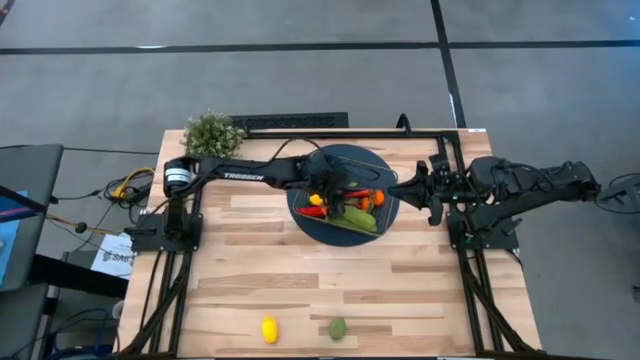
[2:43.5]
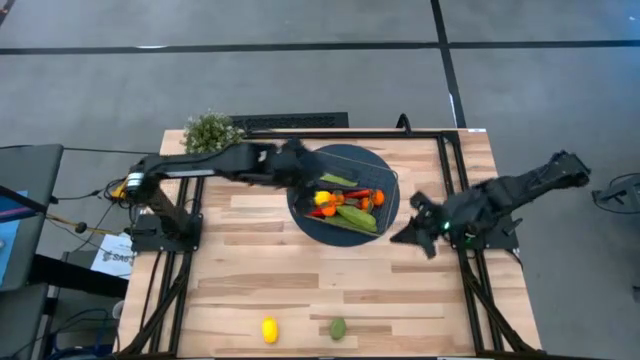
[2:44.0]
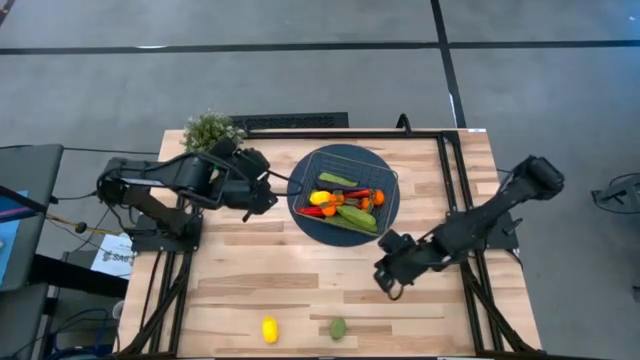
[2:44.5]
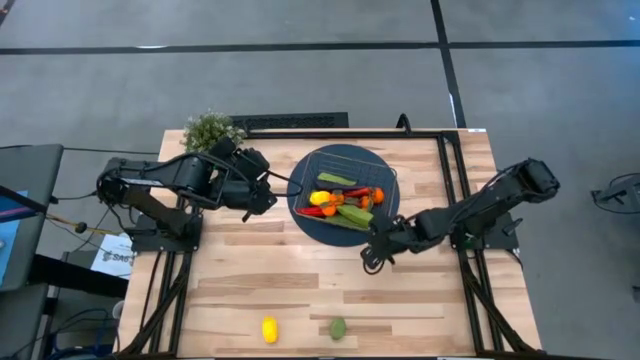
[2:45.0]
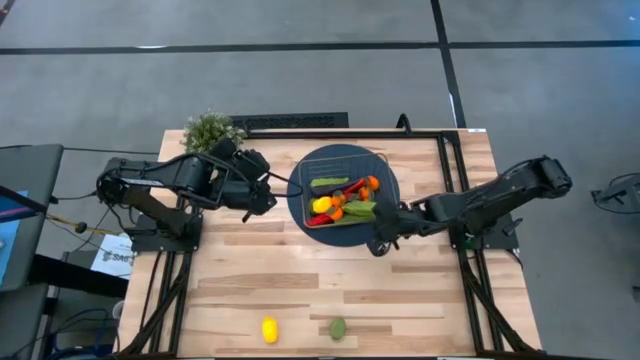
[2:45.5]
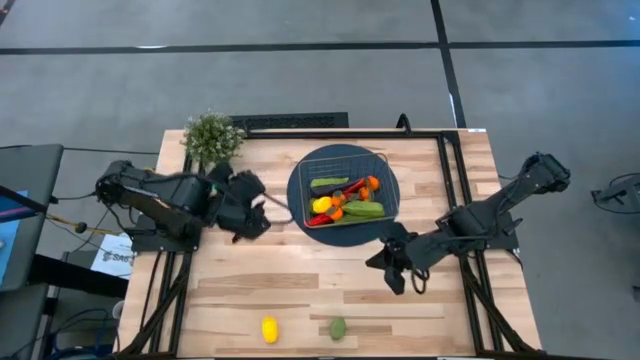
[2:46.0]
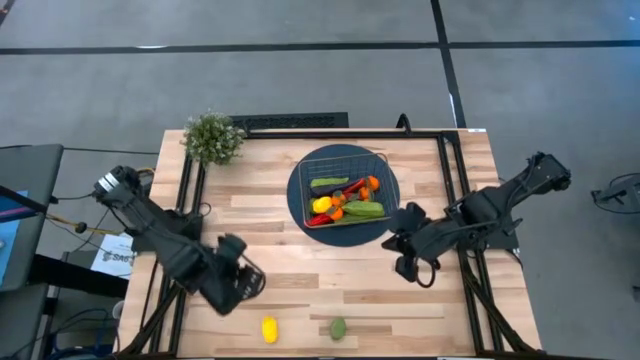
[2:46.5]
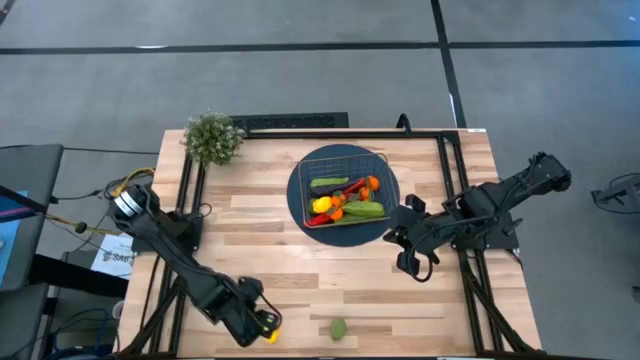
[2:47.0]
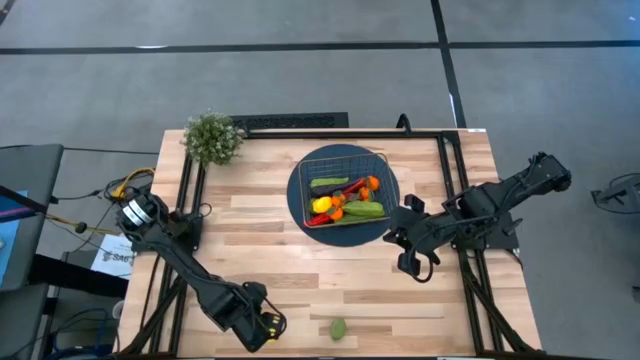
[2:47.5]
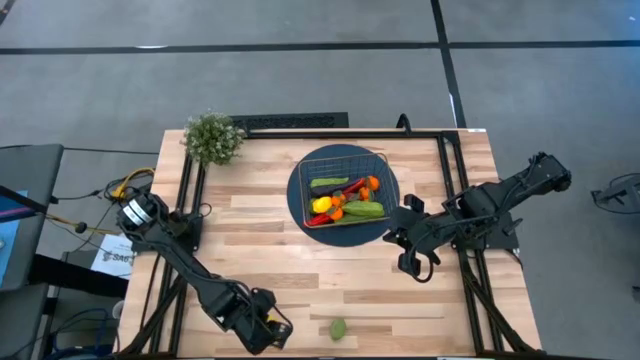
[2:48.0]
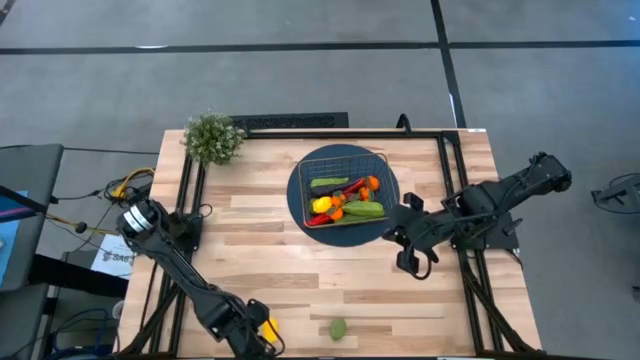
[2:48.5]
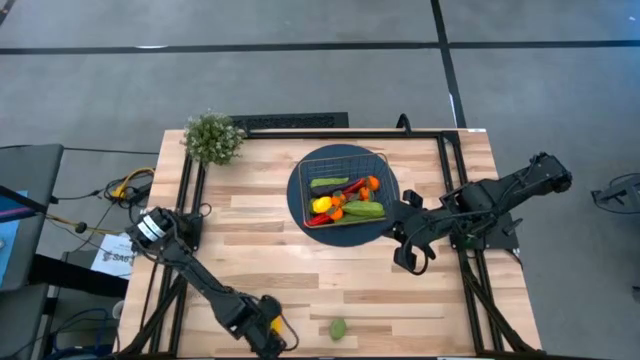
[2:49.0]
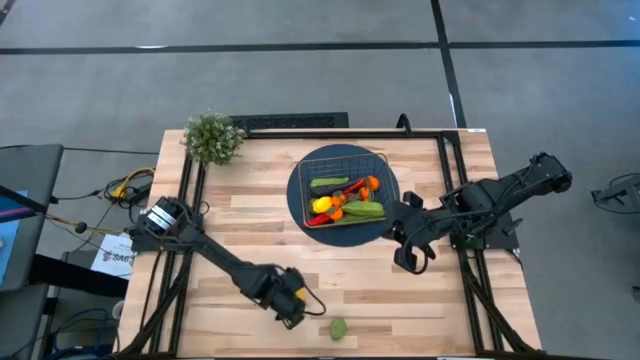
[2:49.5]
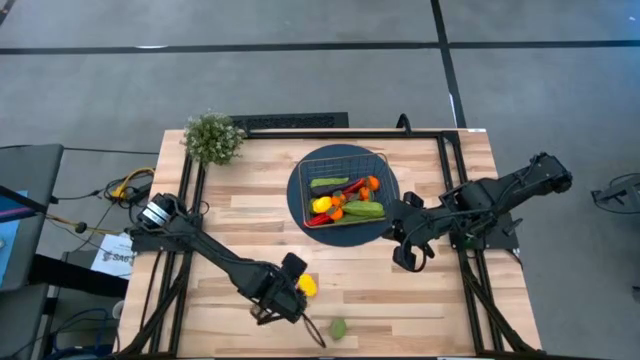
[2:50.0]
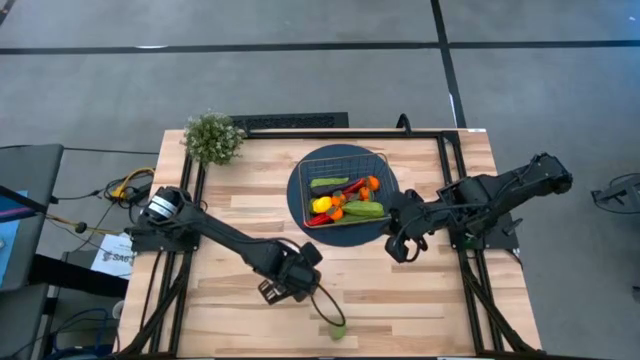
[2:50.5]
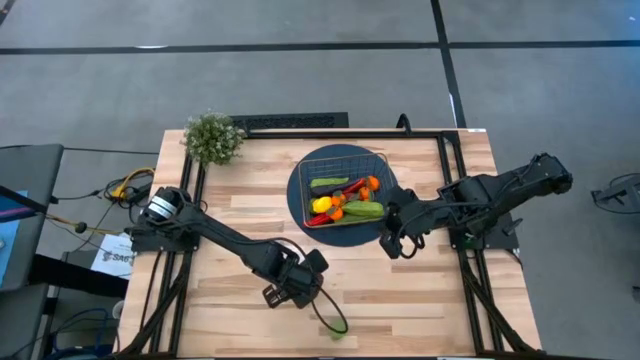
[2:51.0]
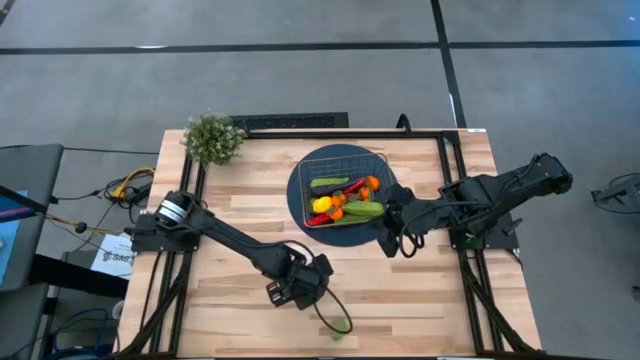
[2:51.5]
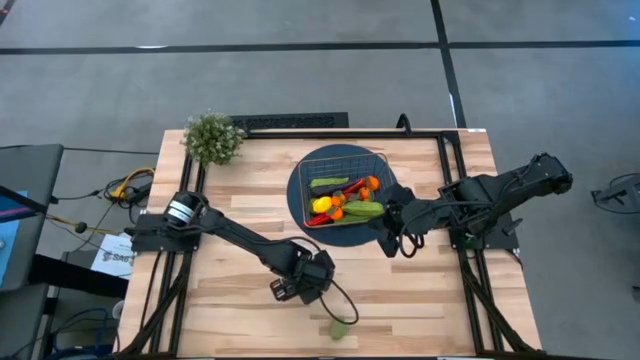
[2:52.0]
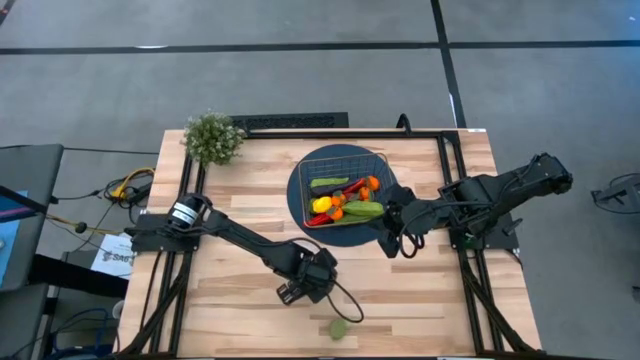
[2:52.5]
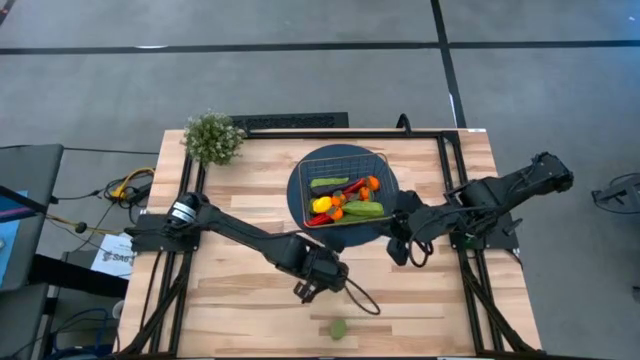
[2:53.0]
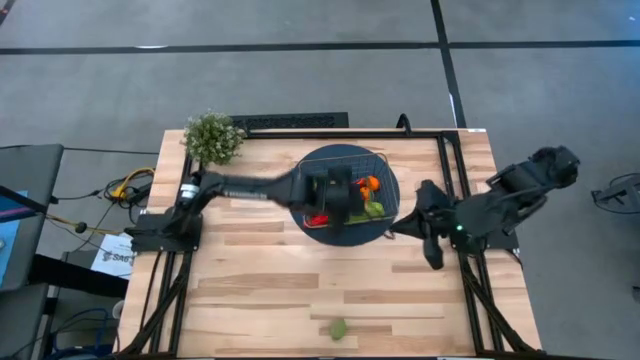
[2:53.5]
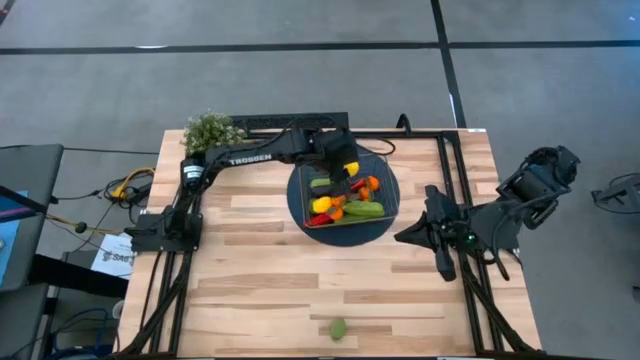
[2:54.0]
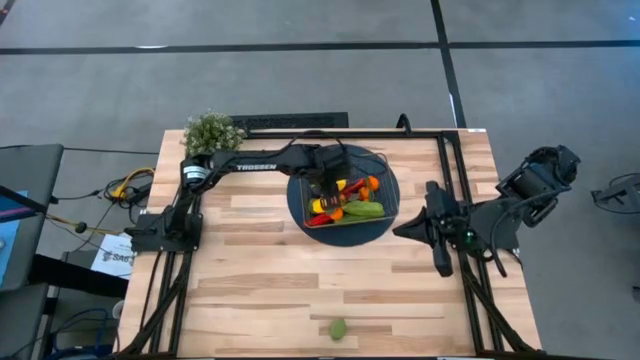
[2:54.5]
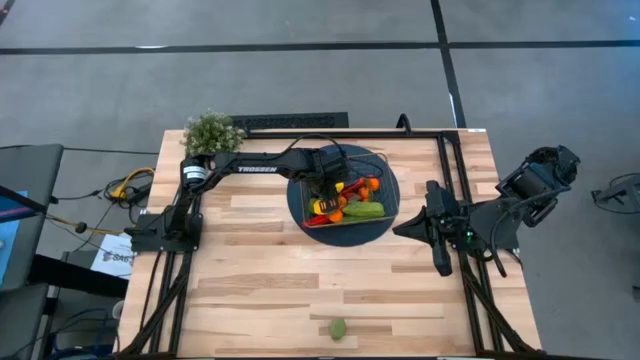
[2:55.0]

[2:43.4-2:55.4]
Task: Build produce basket
Put the lemon into the wire basket

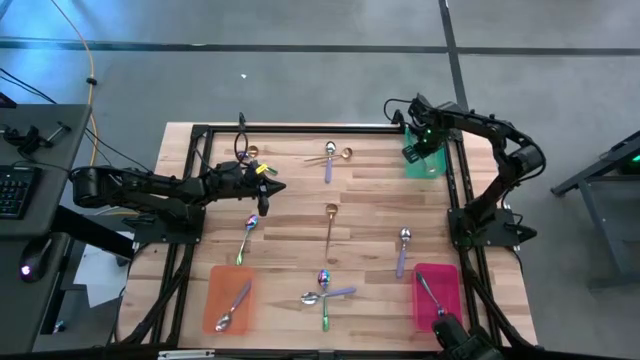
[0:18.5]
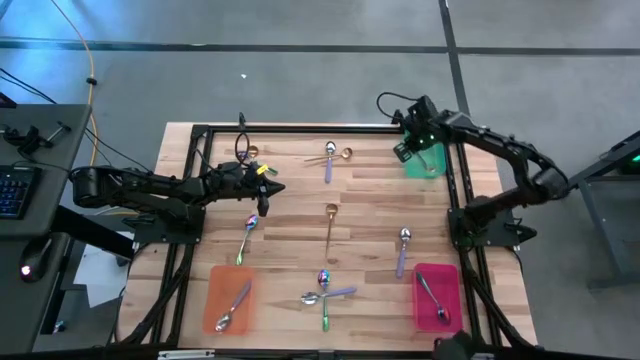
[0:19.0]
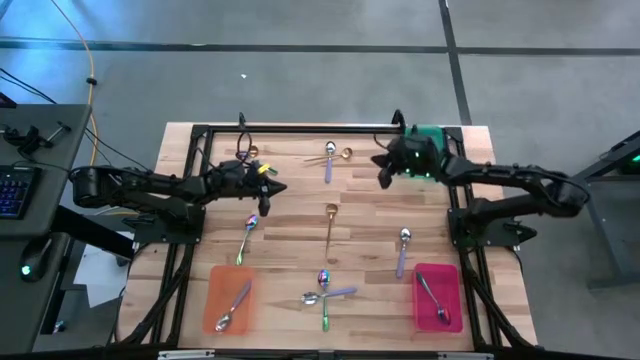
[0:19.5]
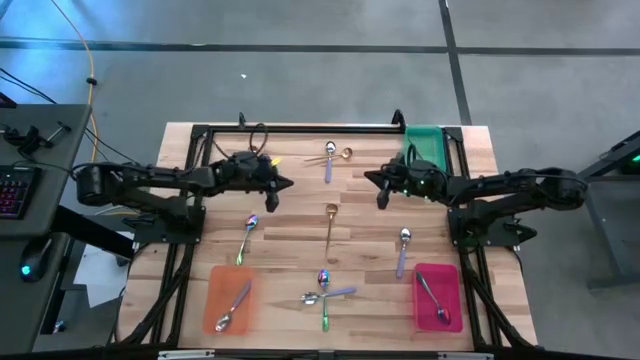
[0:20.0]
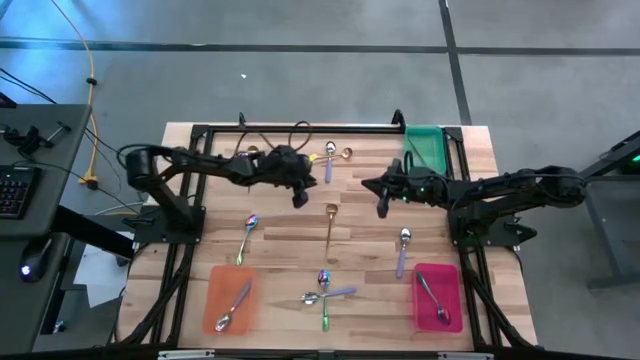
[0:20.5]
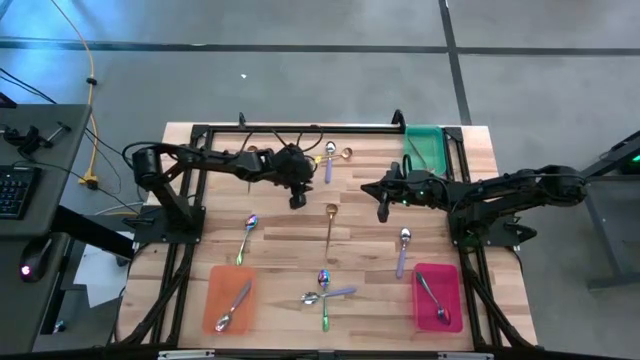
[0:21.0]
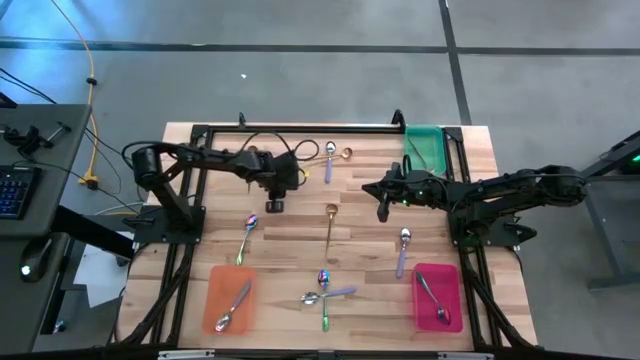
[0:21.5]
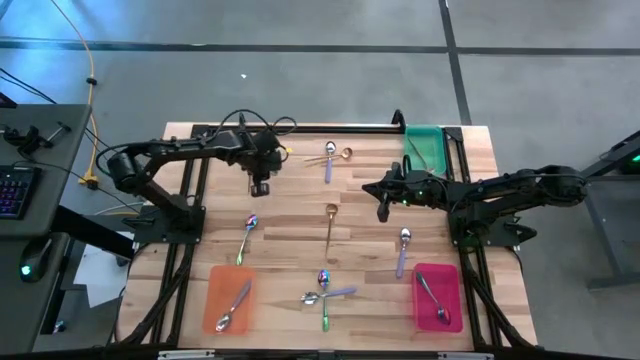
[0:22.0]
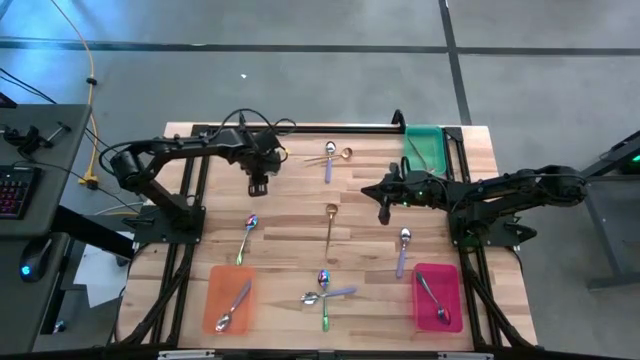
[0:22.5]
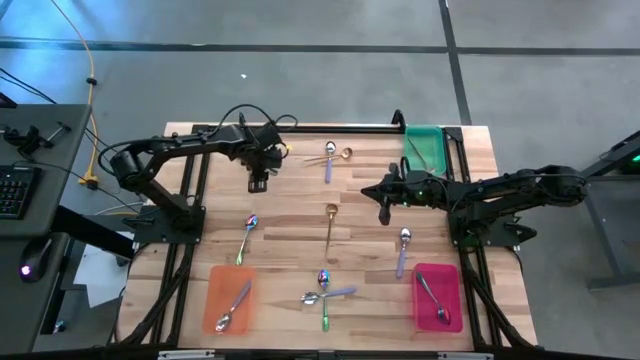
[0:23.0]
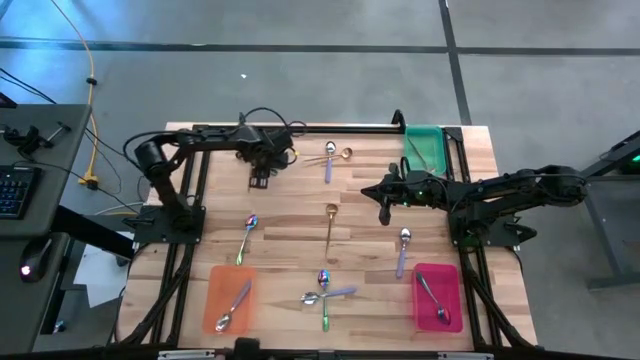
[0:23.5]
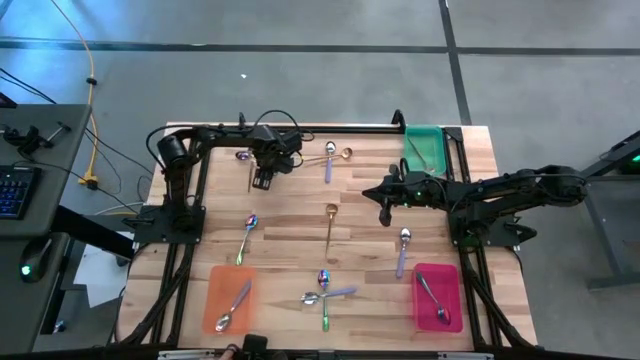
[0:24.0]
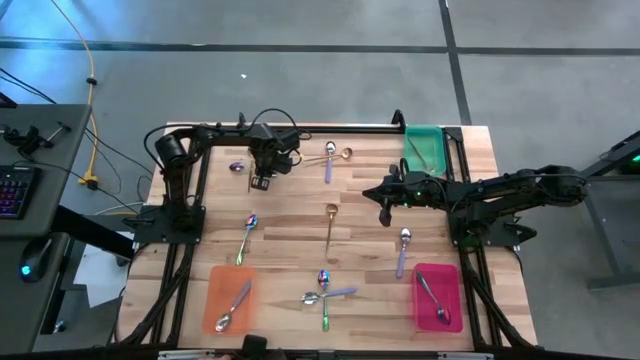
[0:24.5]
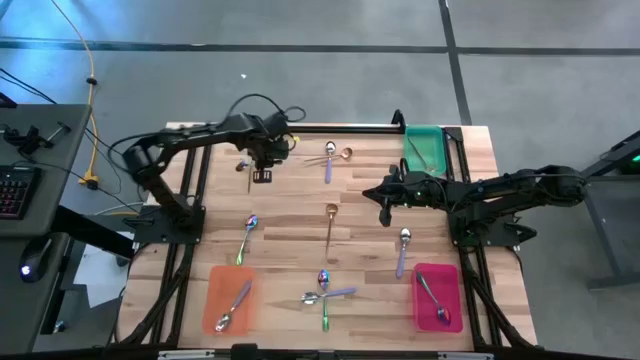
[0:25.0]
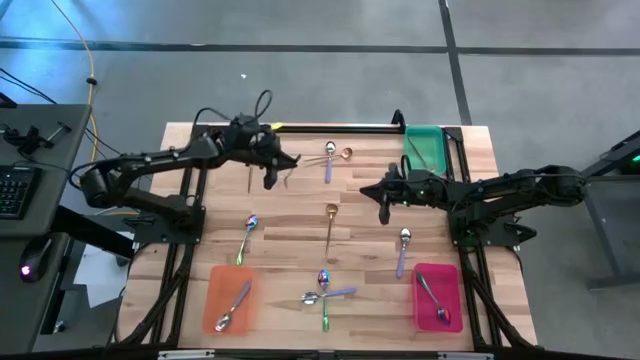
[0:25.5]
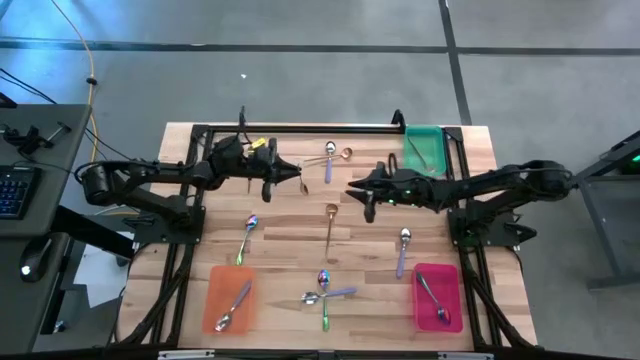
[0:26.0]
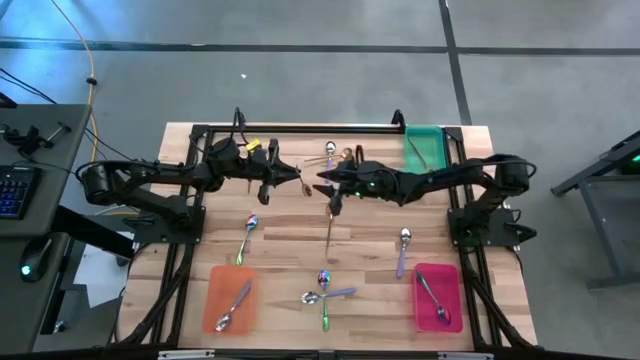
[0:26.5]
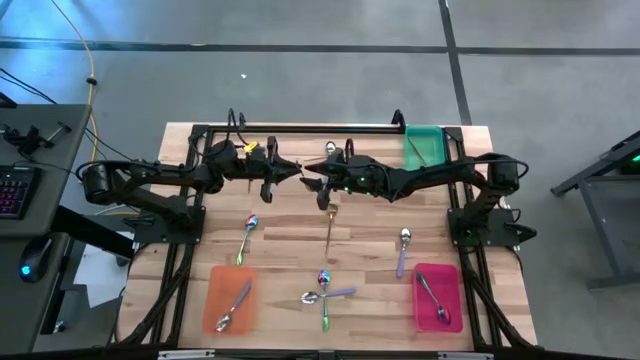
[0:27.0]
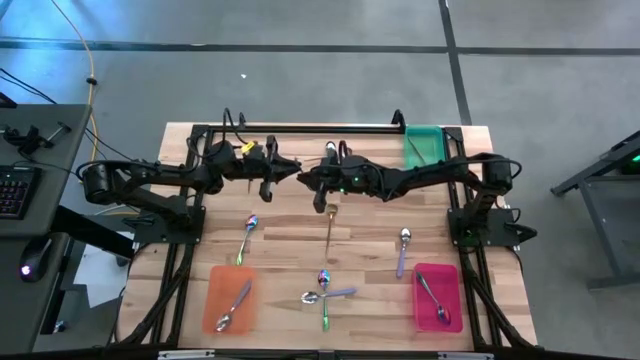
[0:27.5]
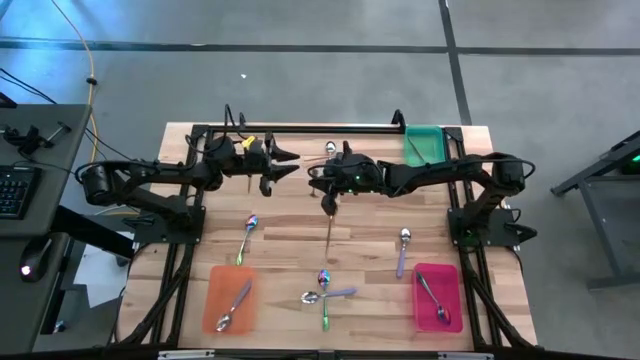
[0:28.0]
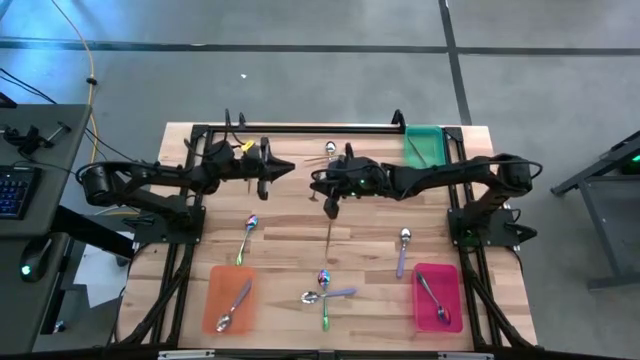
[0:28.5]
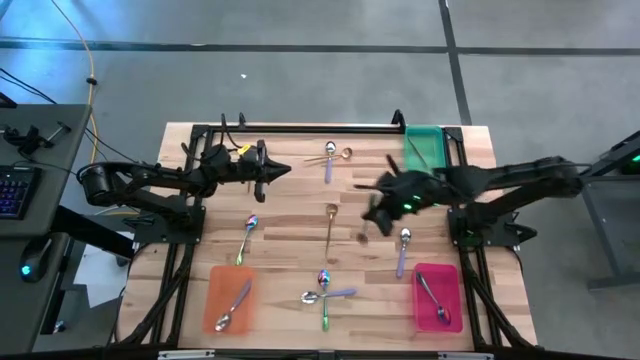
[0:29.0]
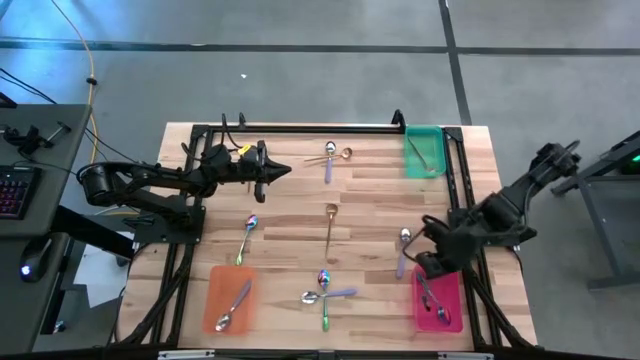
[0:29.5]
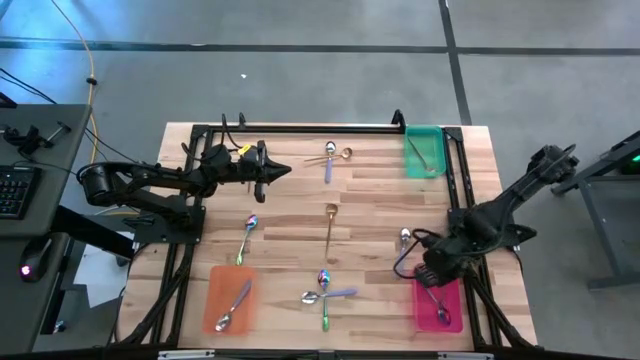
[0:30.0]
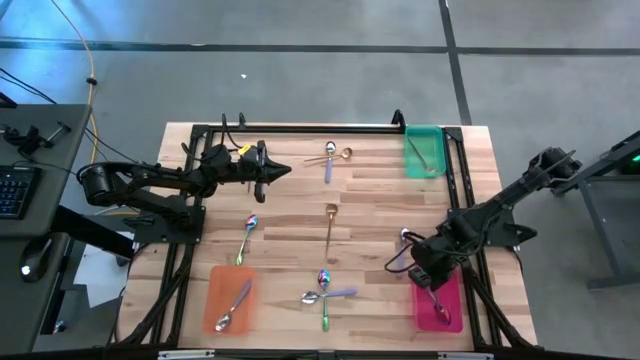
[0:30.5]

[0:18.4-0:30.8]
Task: Sort silverware by color (type)
Put the blue spoon into the red bin
